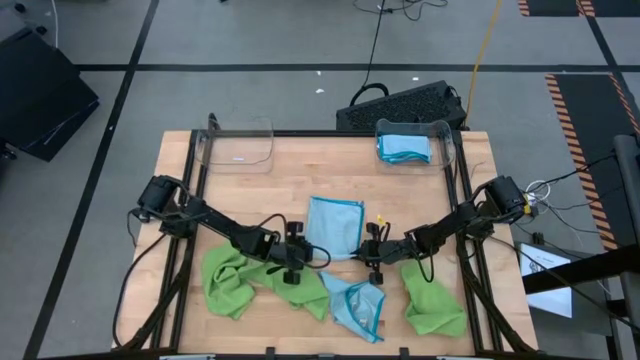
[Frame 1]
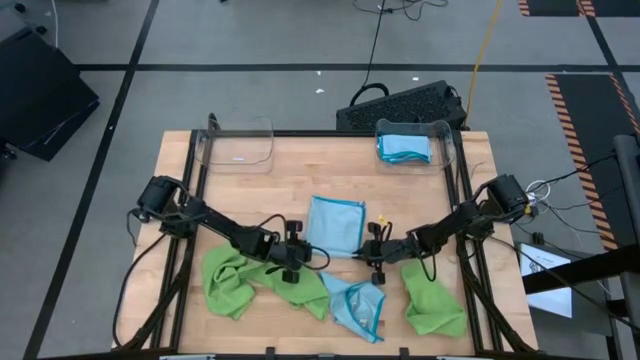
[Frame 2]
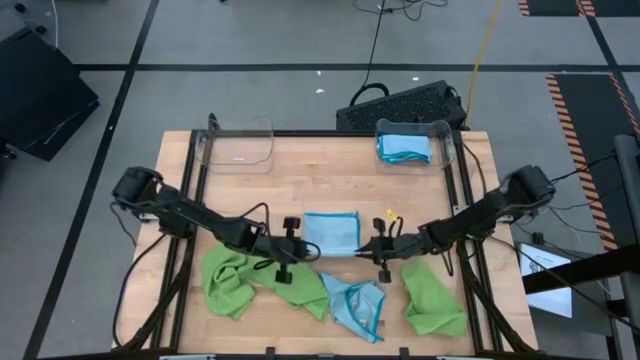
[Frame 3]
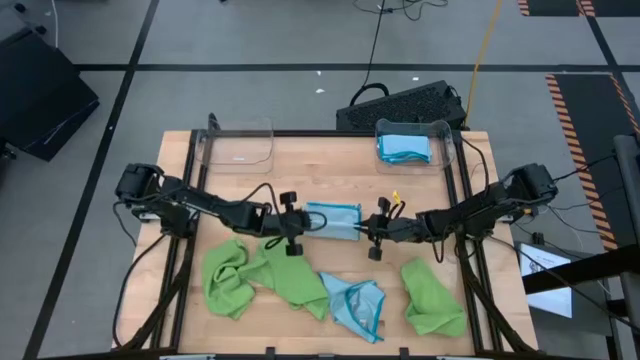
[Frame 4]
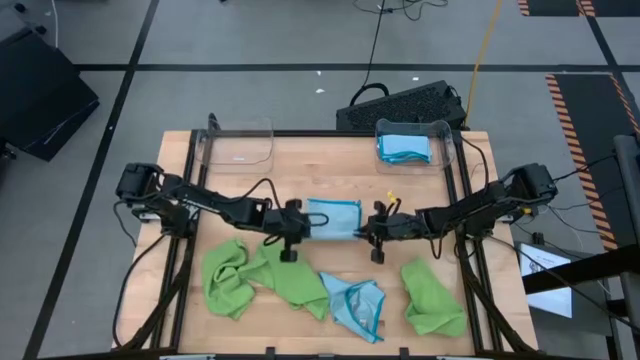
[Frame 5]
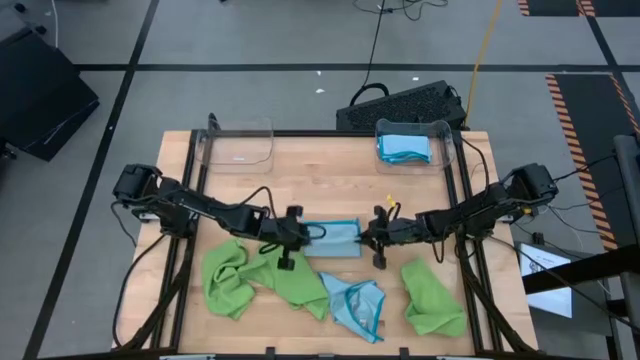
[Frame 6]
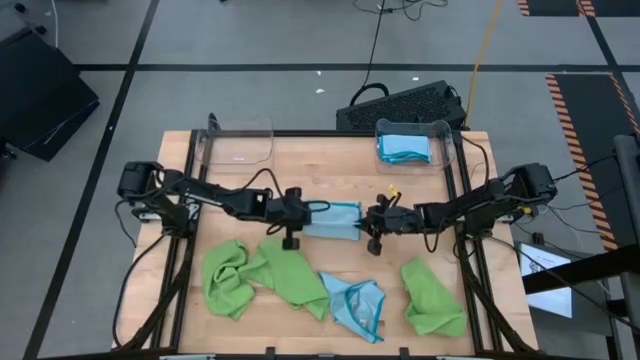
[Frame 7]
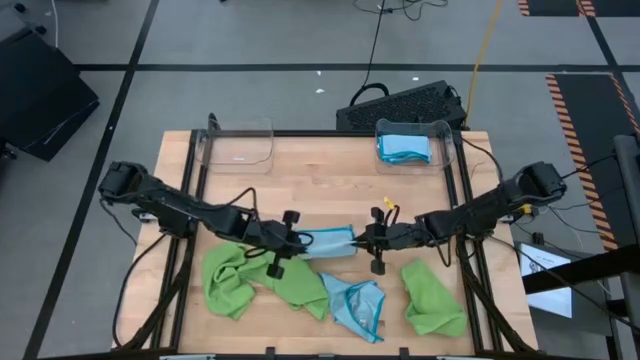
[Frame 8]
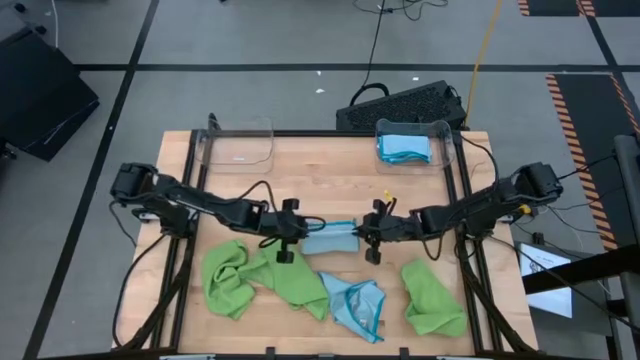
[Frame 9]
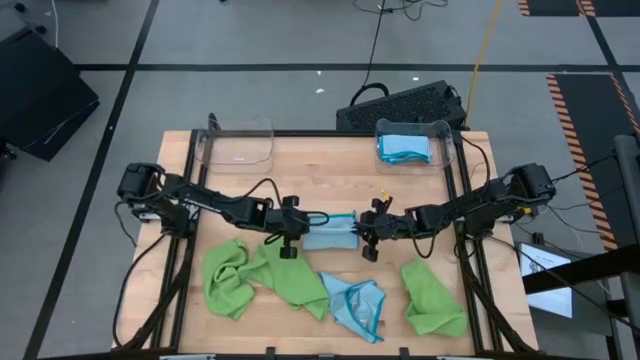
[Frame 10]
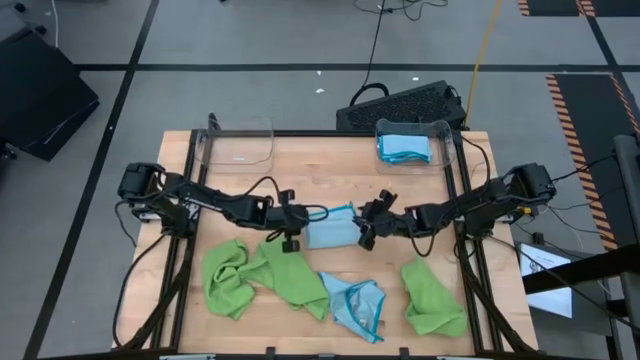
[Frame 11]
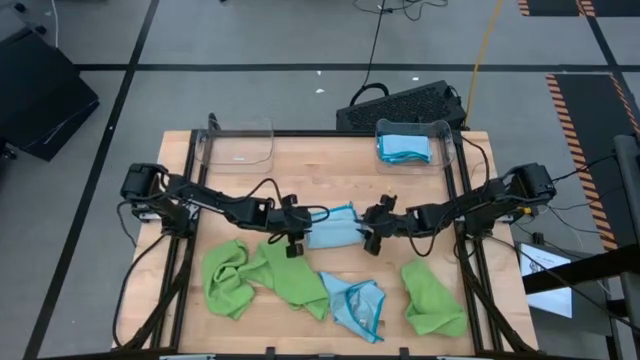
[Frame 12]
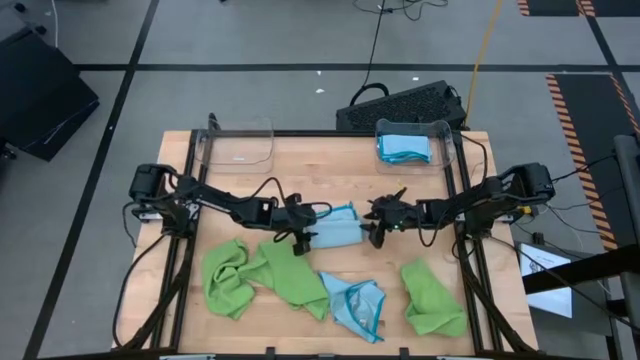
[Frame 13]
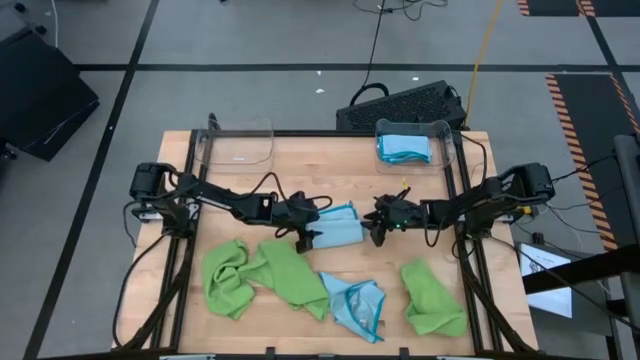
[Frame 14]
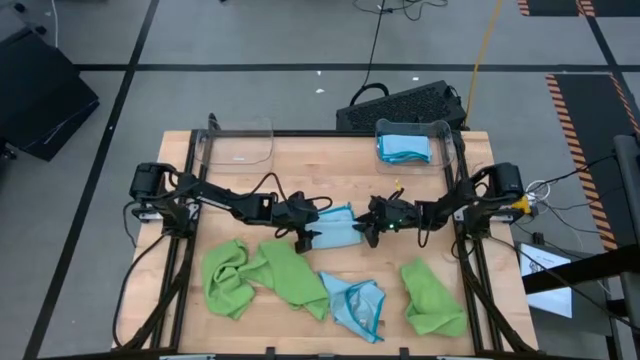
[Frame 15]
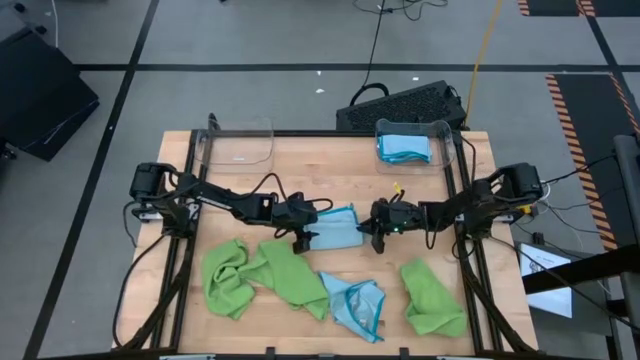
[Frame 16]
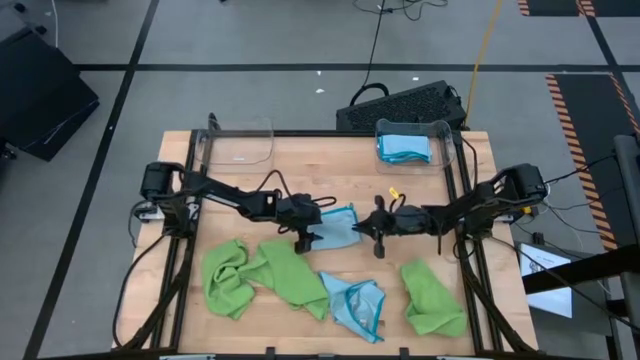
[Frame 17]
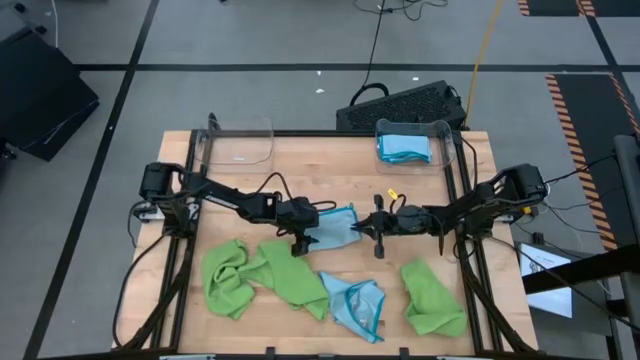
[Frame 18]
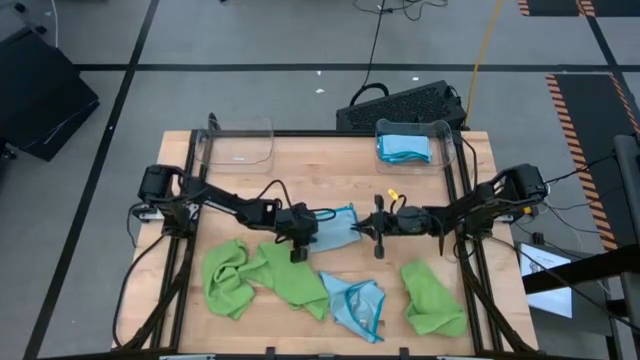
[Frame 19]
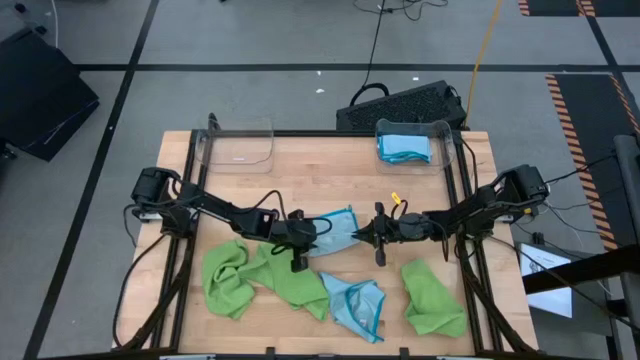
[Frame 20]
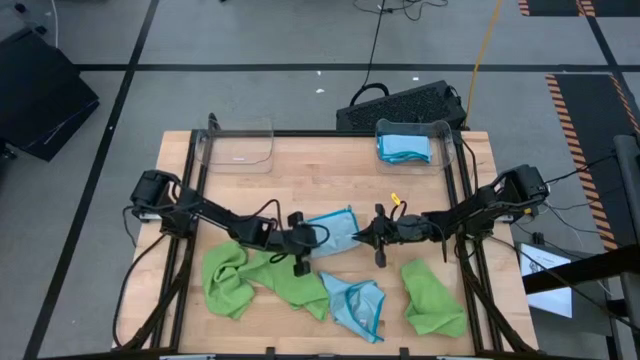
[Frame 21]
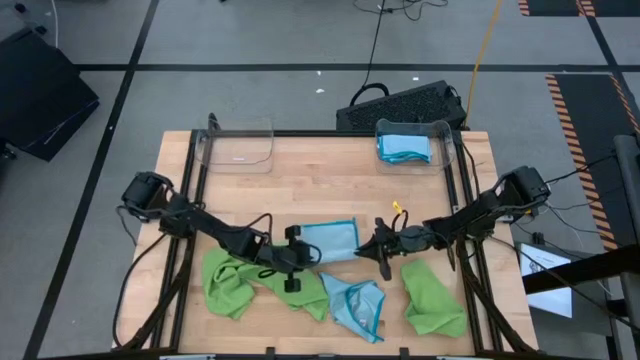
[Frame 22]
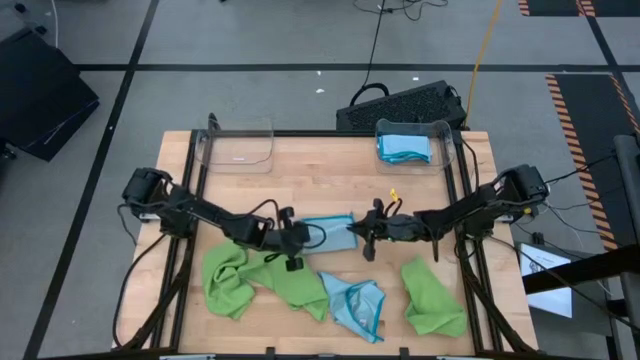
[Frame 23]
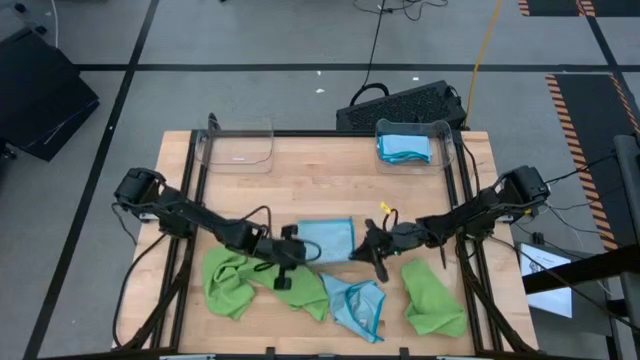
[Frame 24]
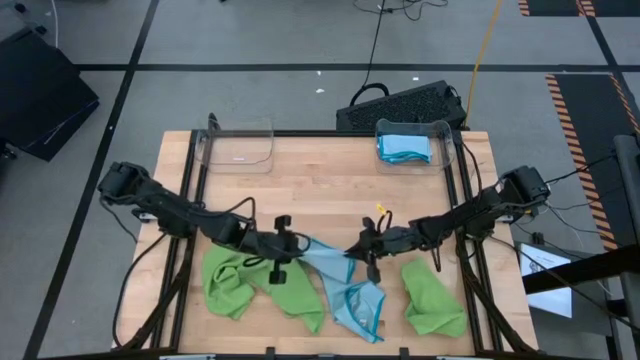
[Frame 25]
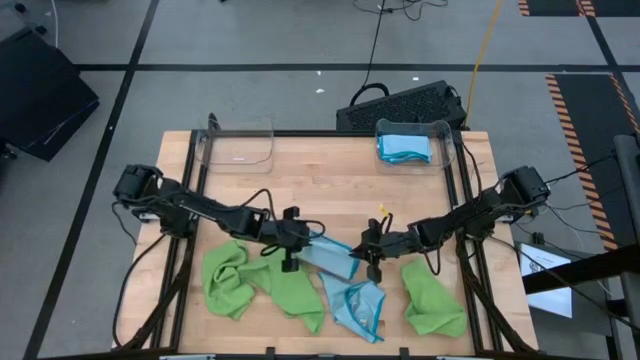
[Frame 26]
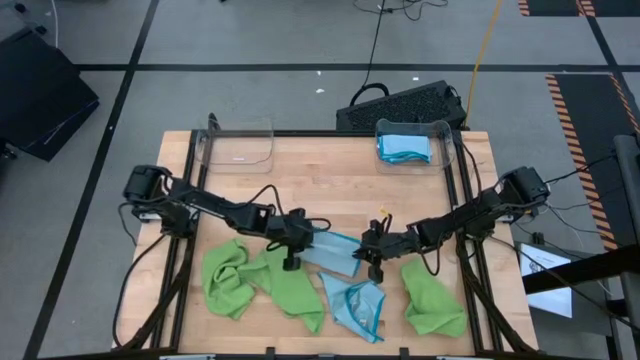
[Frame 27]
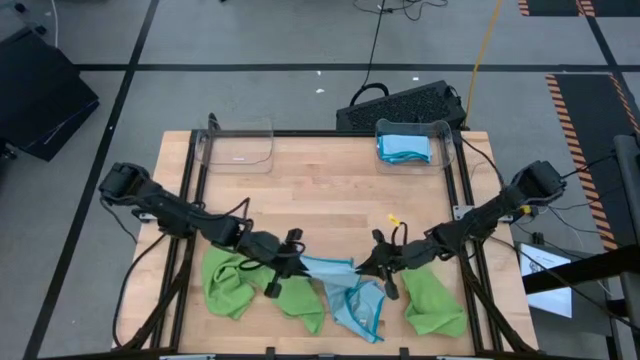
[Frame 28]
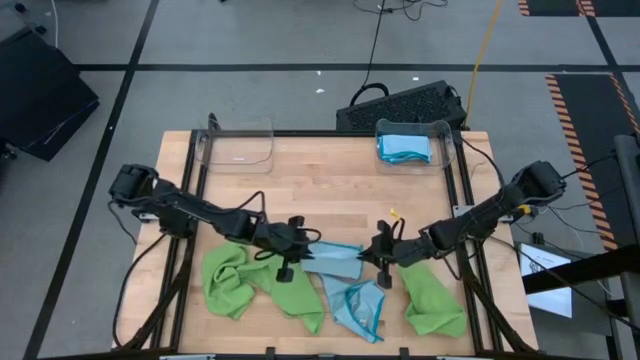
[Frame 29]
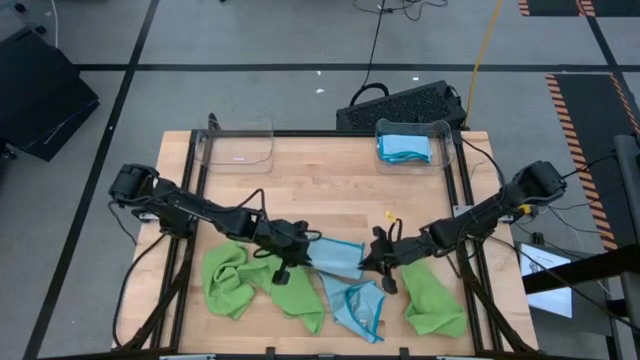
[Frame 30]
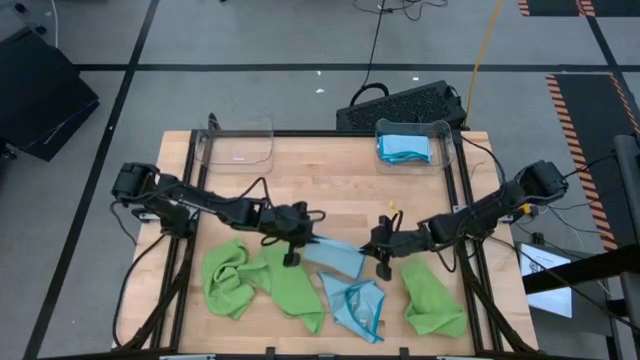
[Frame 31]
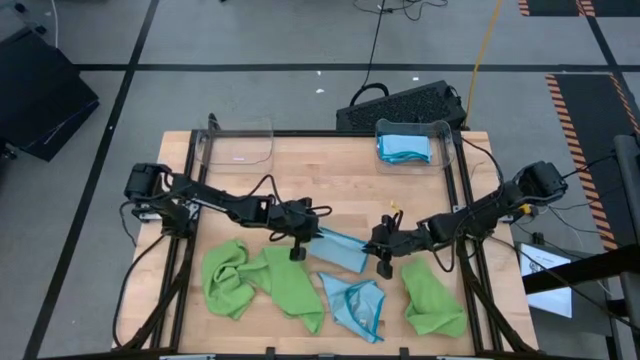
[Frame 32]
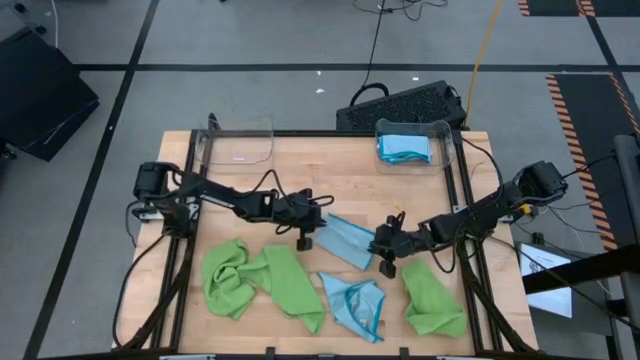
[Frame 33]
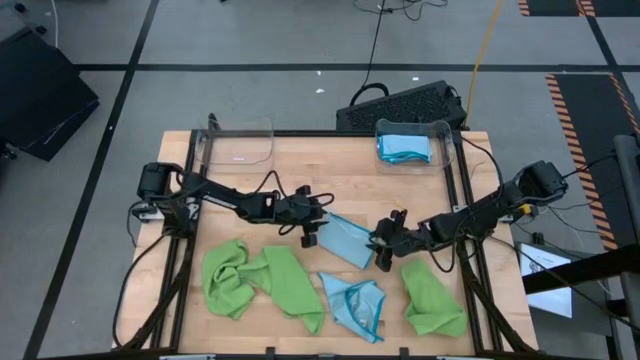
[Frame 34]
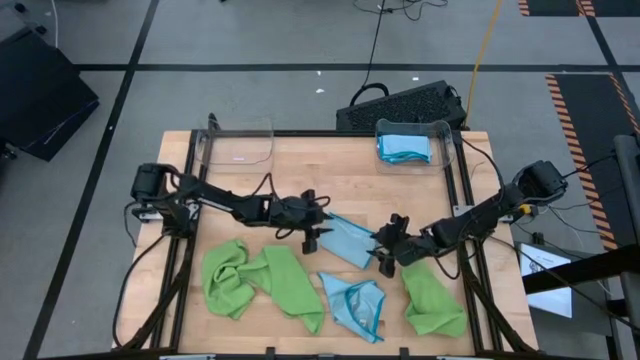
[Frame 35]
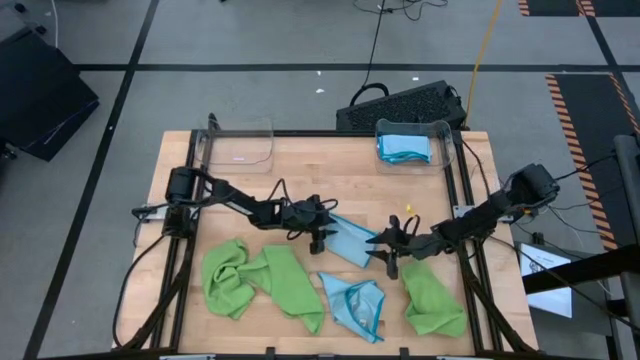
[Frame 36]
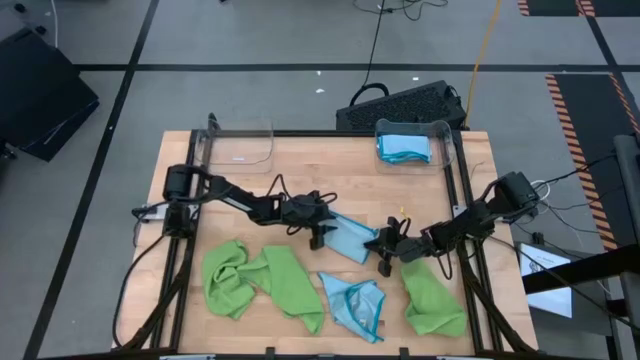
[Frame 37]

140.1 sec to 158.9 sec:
Task: Fold microfiber towels
Fold the top blue microfiber cloth

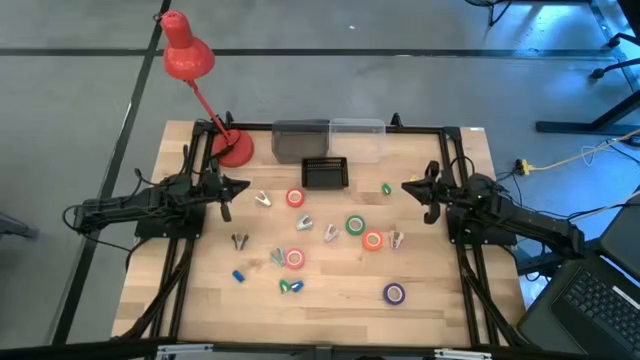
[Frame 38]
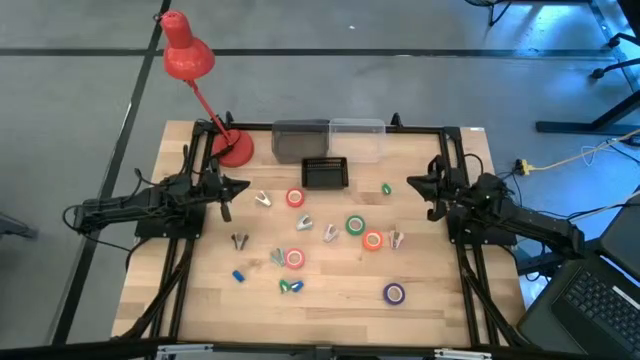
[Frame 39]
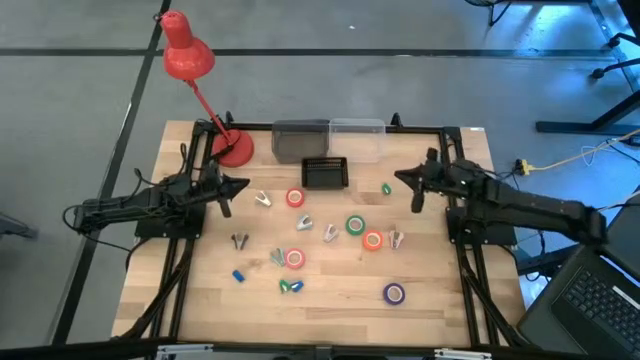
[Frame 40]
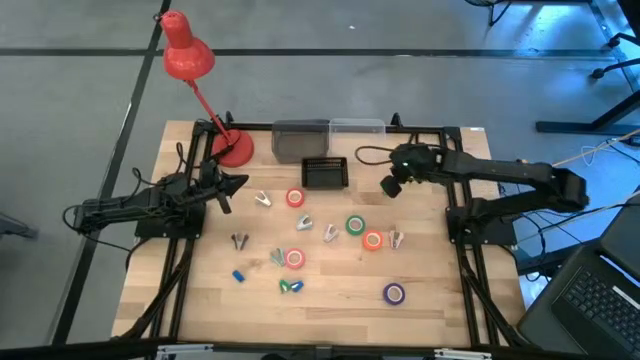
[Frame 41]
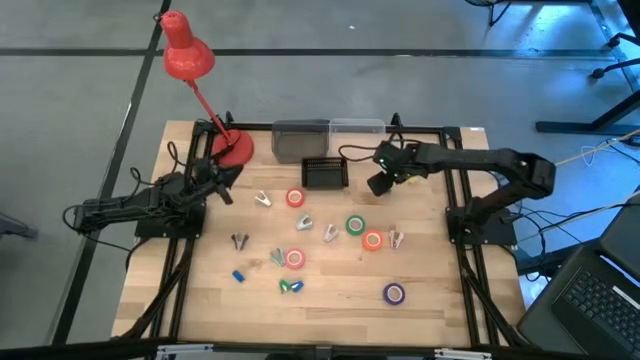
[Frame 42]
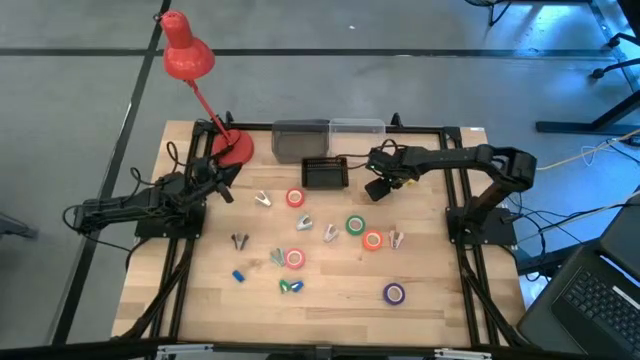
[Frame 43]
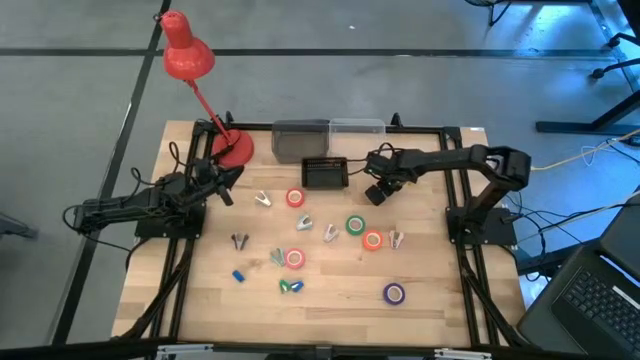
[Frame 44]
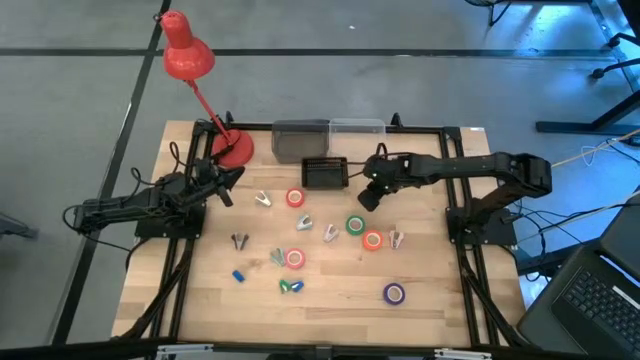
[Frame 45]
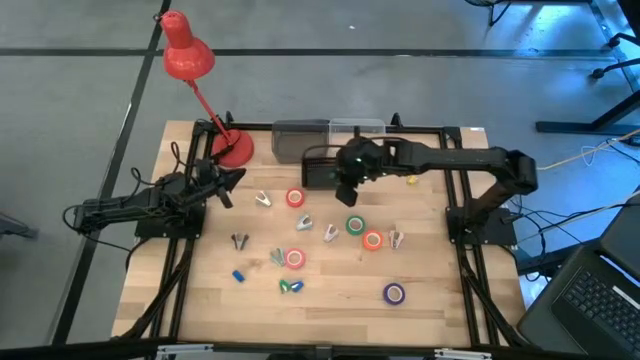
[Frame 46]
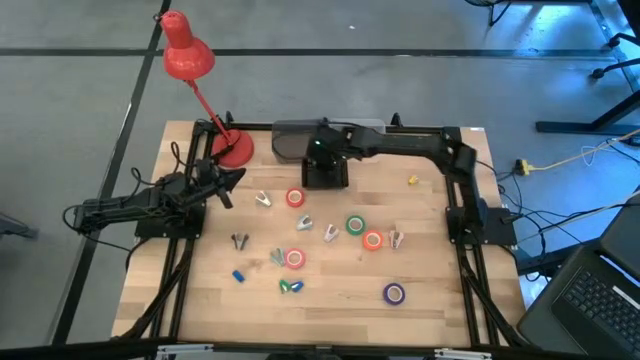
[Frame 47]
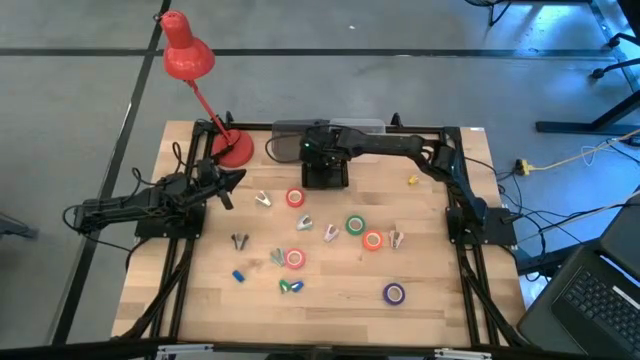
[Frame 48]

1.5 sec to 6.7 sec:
Task: Pick and place Stapler, Stapler remover, tape
Put the top green stapler into the black bin
